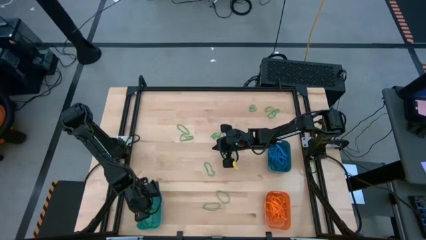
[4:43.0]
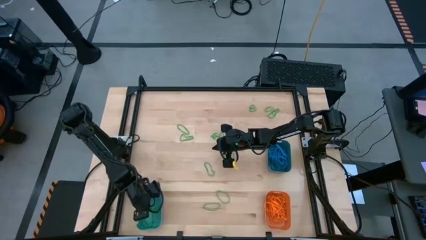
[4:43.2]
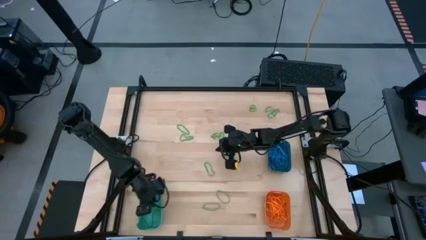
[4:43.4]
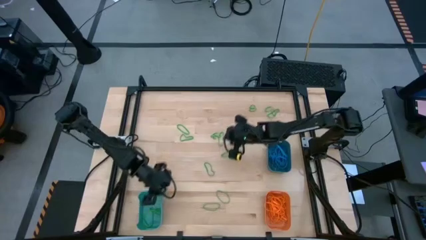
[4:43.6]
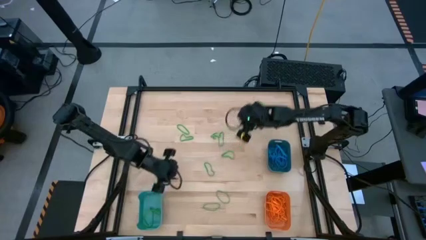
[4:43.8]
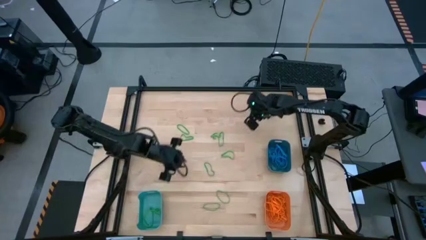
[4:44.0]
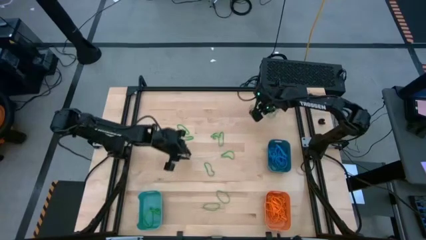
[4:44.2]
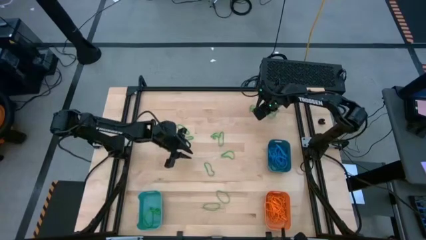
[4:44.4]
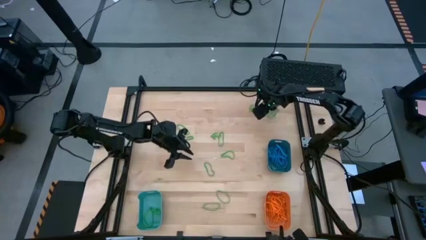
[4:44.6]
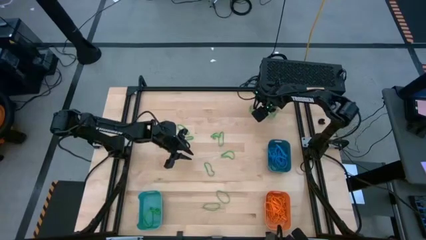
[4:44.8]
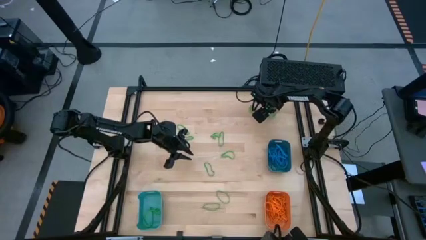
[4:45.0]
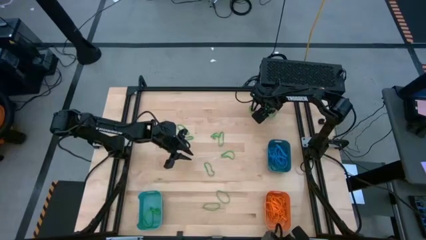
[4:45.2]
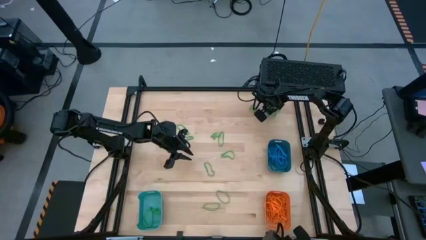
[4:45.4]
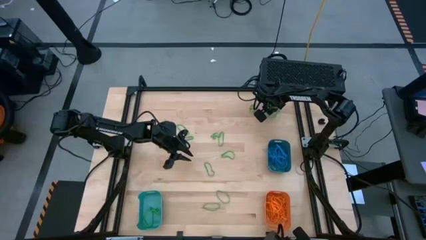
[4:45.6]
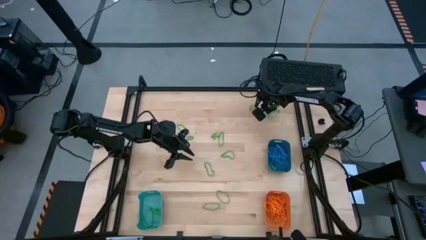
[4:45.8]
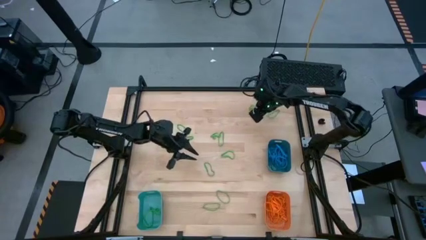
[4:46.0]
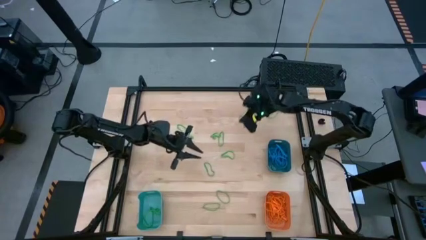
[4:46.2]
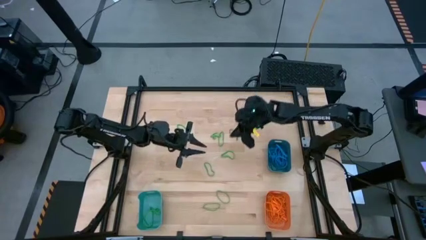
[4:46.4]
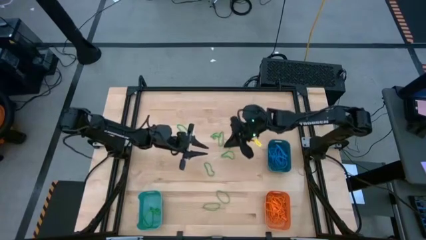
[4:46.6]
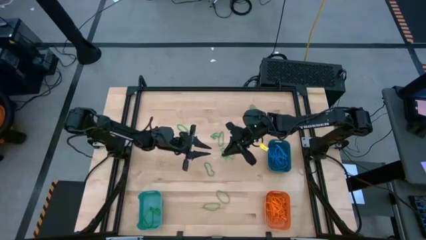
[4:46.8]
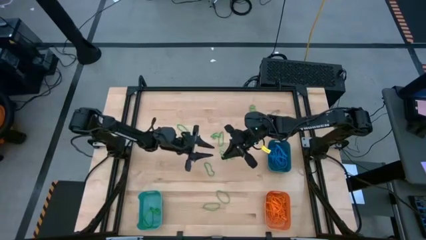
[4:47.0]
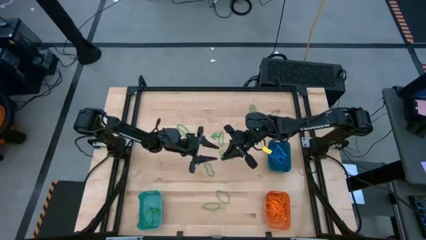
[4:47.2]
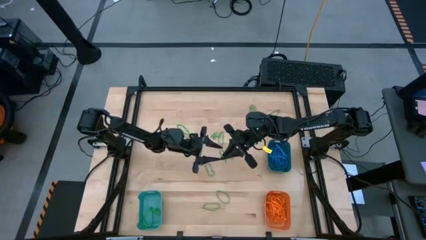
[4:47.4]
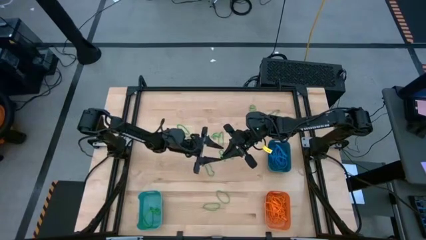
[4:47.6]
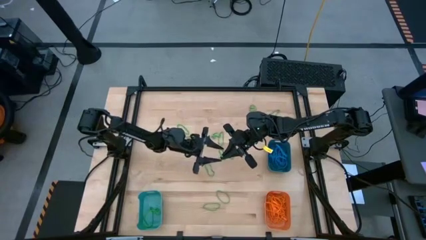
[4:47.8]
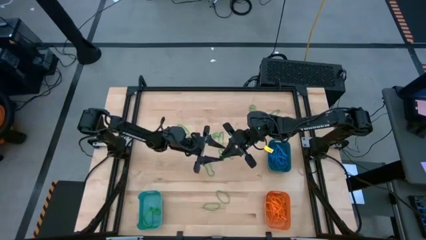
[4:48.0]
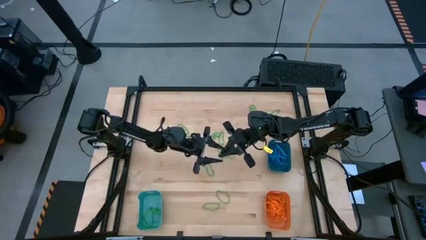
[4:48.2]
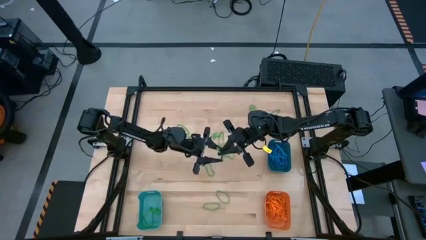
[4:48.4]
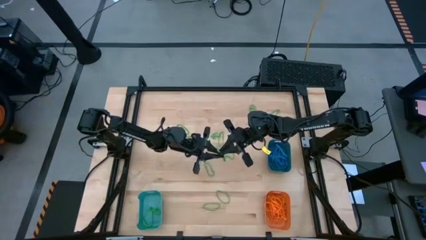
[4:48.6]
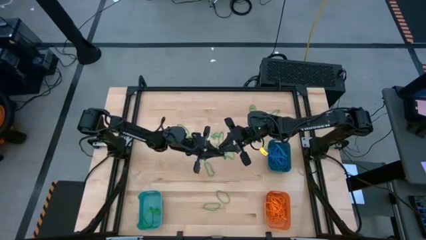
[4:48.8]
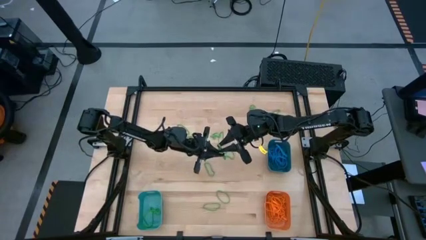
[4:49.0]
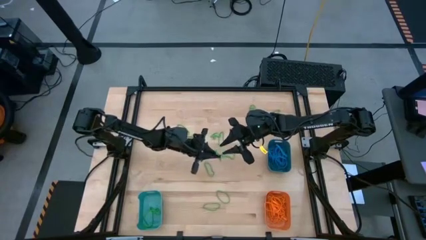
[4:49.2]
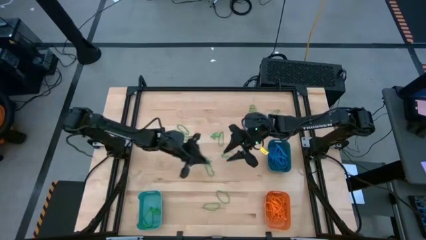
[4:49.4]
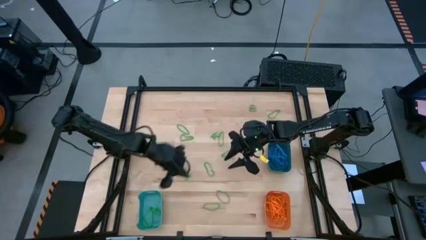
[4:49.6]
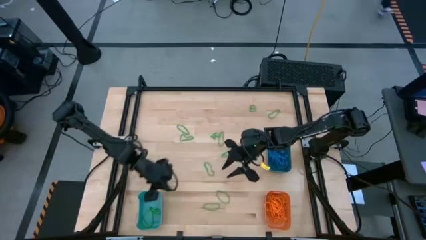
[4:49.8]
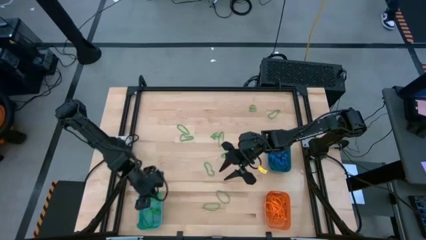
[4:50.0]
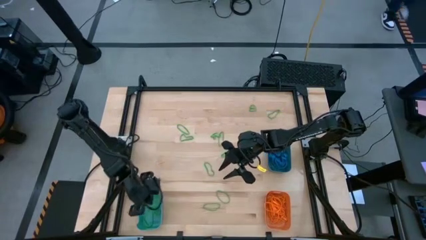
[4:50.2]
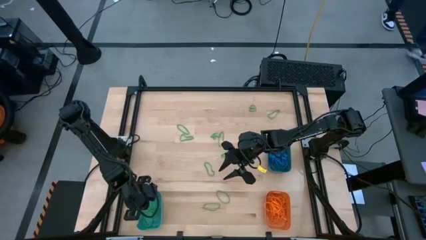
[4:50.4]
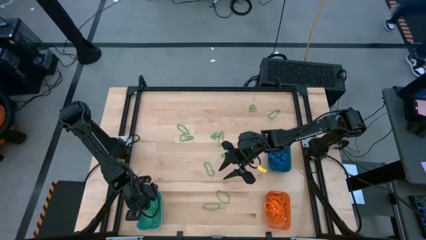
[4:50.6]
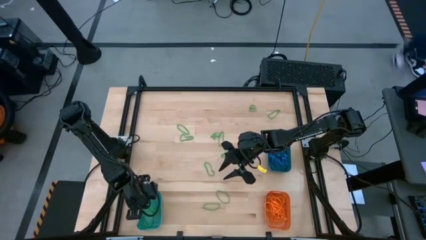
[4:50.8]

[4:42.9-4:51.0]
Task: Sort rubber bands into baskets
Put the green rubber band into the green bin

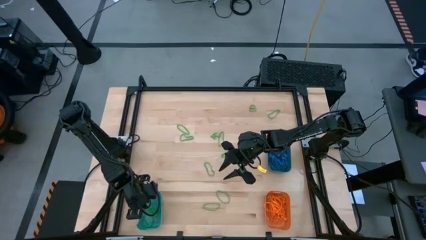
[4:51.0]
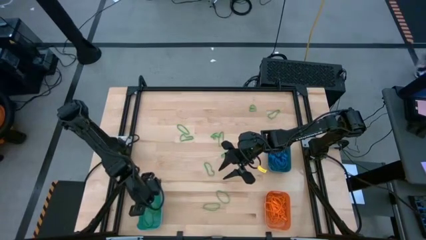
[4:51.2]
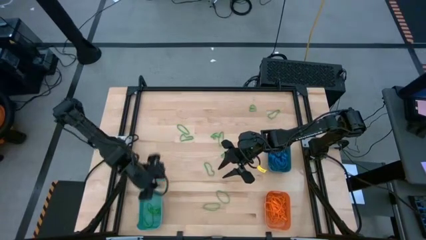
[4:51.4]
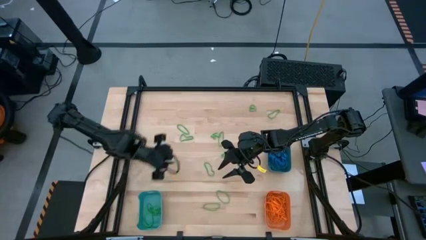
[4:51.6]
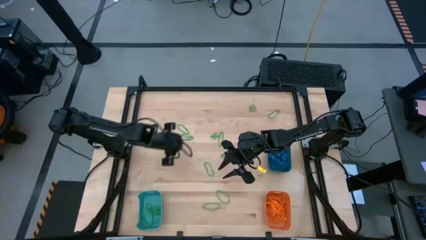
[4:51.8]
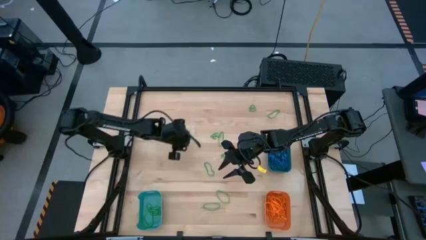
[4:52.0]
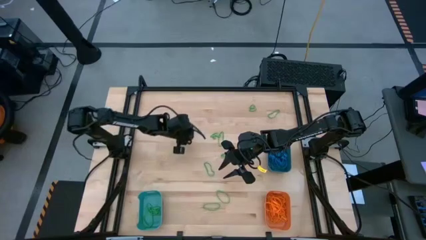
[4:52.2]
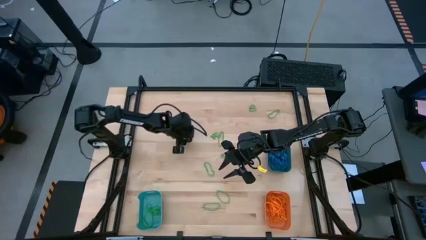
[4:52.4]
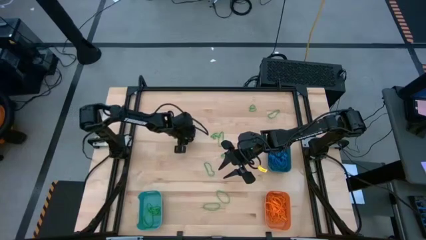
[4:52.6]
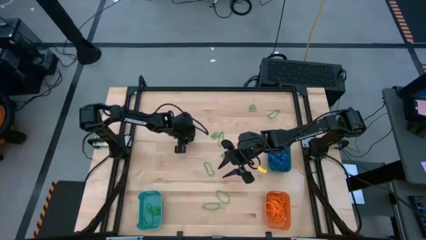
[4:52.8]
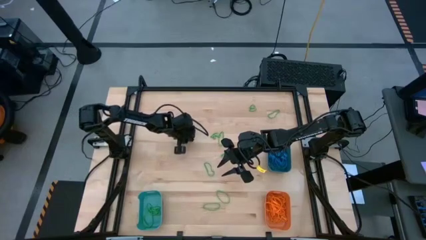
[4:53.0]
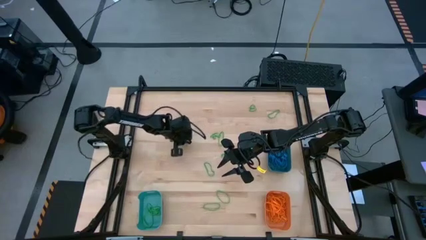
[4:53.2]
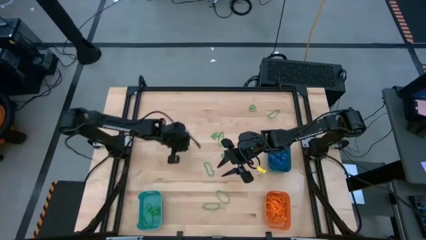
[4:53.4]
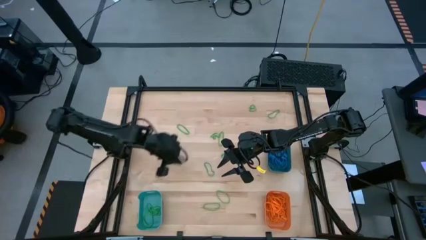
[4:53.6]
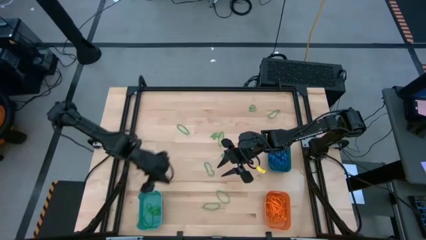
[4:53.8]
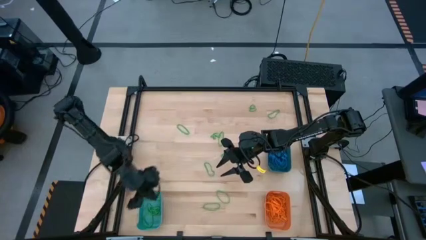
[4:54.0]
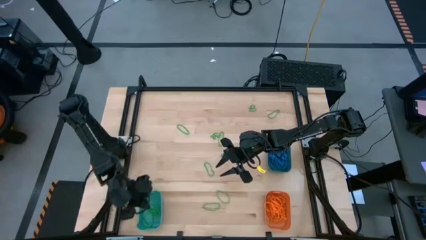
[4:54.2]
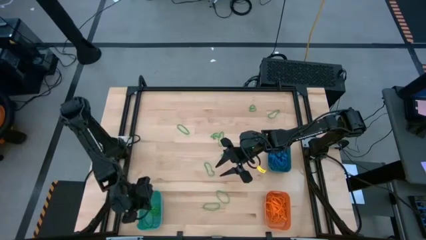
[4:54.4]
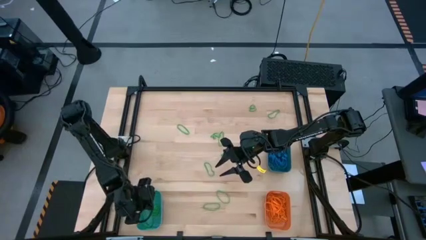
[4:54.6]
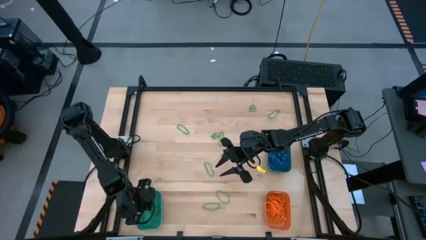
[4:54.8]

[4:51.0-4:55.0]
Put the green rubber band into the green bin

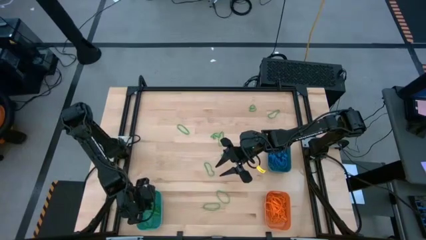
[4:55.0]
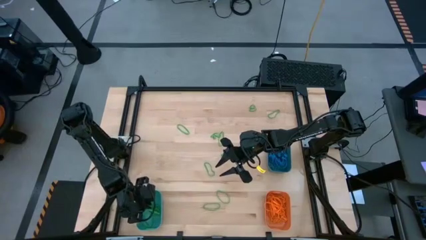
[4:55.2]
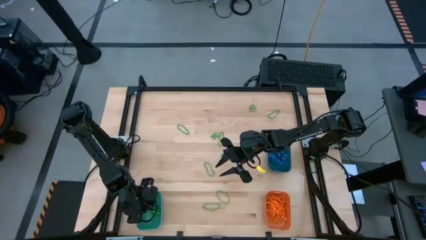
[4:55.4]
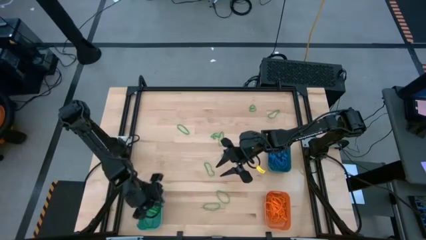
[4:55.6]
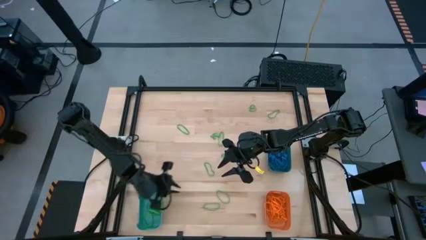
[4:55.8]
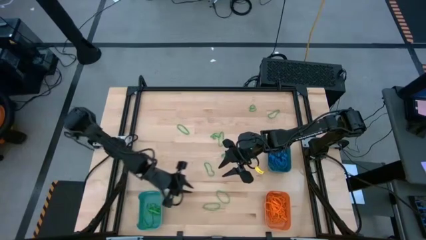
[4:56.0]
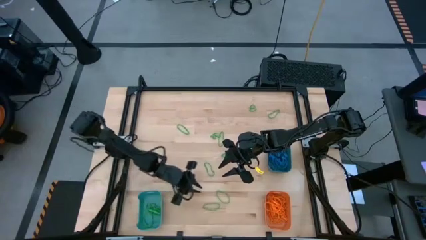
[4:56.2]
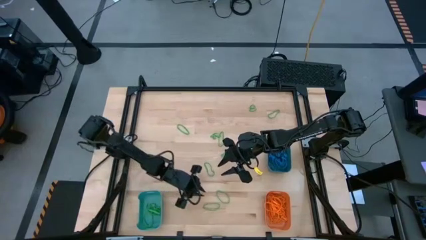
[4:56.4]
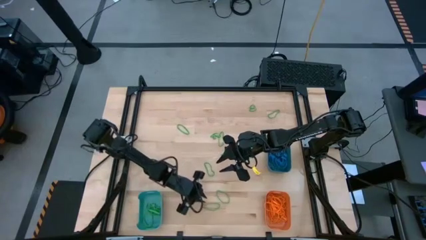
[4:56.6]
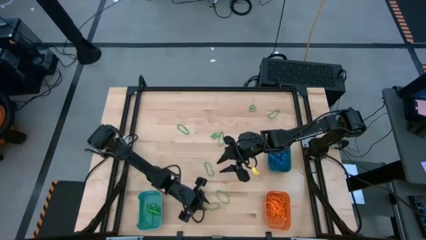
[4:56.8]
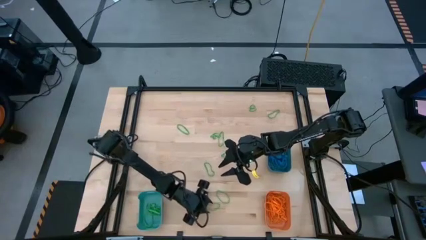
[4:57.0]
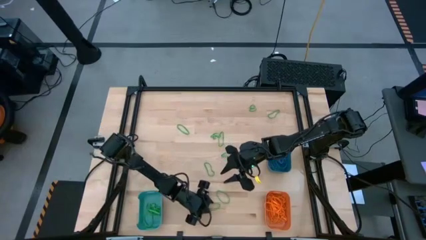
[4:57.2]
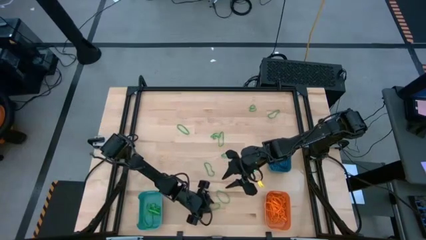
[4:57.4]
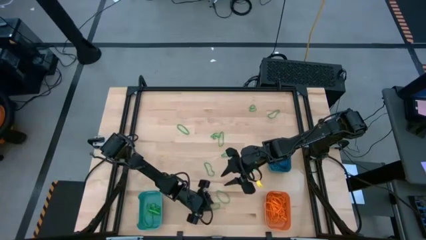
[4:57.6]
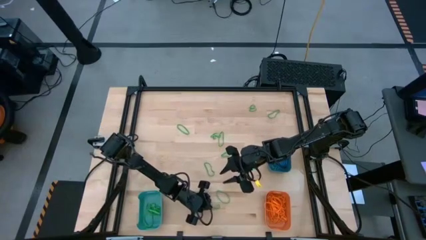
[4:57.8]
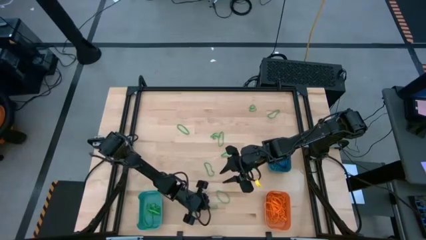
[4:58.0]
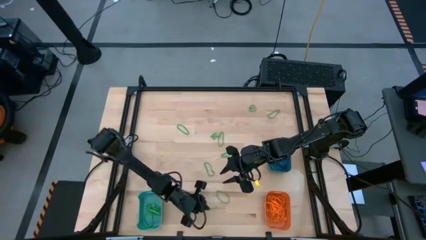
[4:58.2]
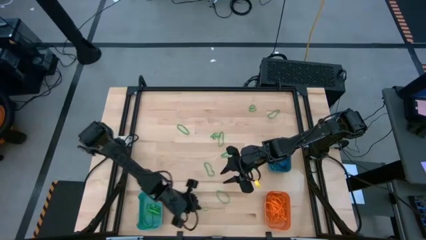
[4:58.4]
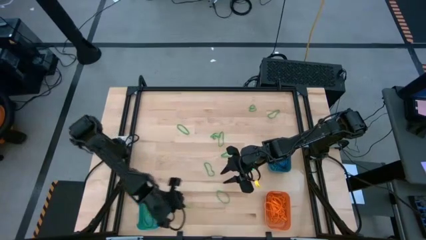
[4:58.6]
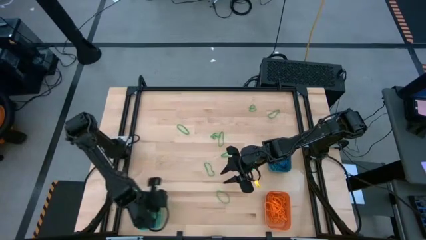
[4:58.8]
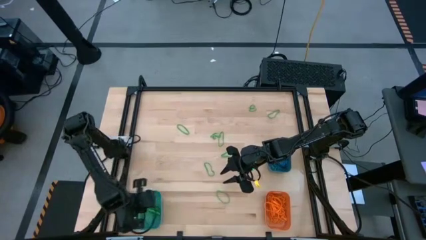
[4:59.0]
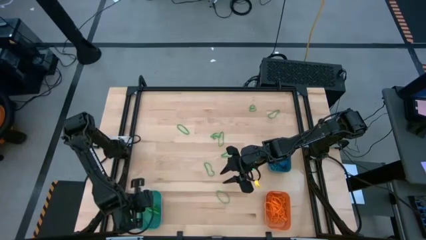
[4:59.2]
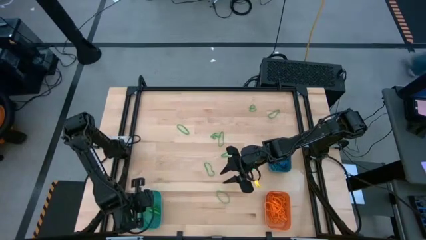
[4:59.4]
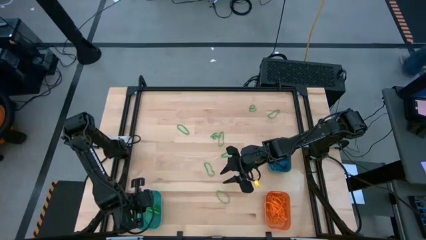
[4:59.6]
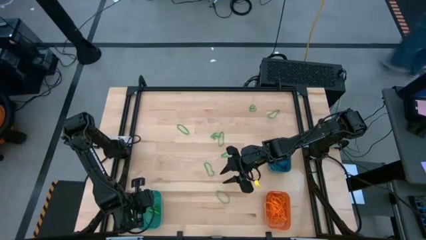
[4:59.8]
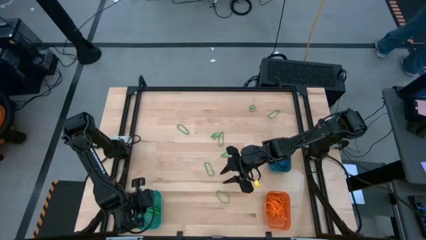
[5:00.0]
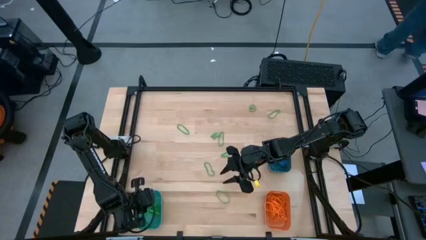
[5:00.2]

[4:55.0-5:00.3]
Put the green rubber band into the green bin
